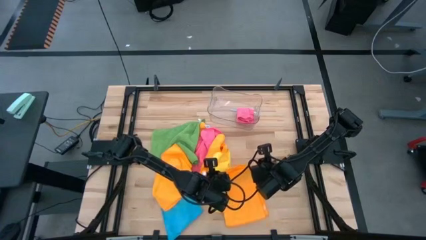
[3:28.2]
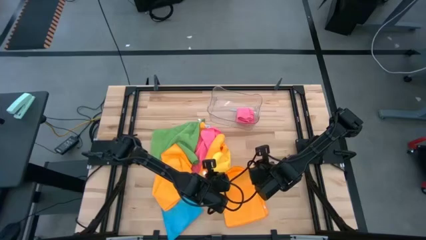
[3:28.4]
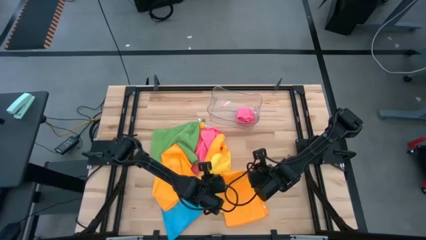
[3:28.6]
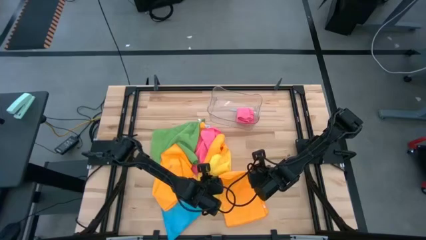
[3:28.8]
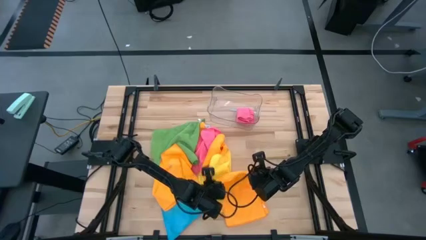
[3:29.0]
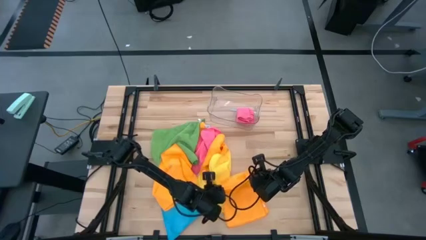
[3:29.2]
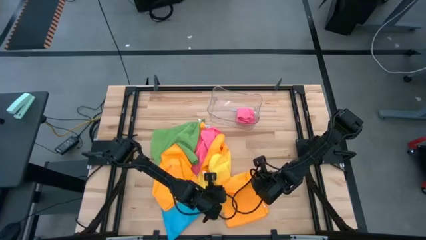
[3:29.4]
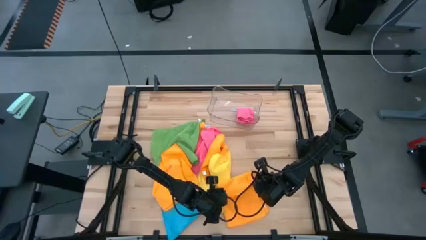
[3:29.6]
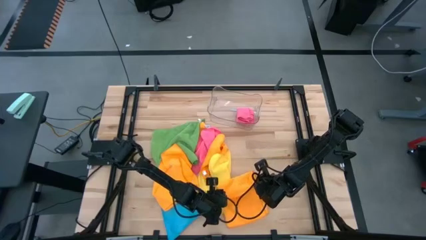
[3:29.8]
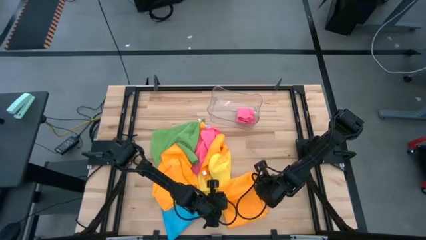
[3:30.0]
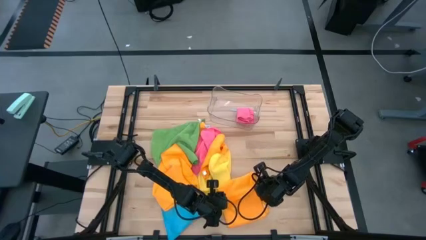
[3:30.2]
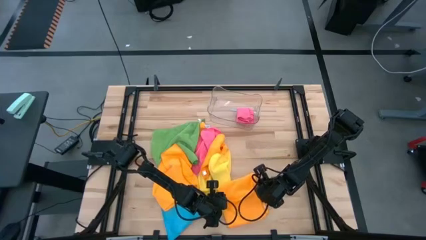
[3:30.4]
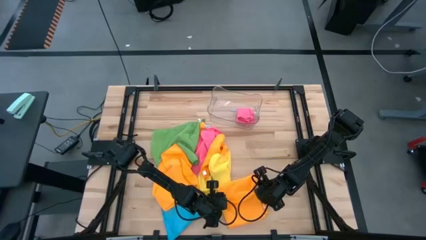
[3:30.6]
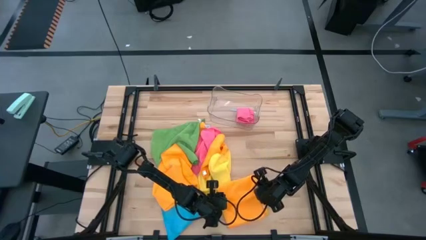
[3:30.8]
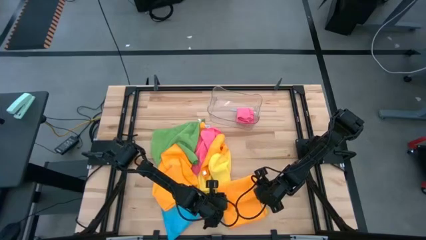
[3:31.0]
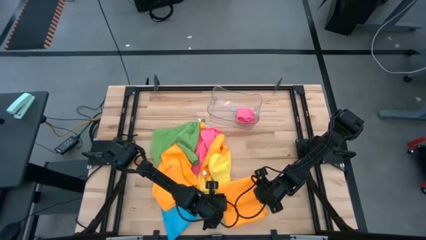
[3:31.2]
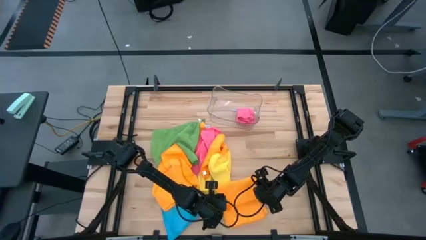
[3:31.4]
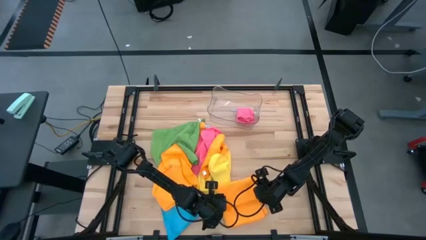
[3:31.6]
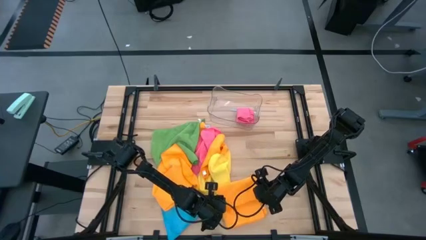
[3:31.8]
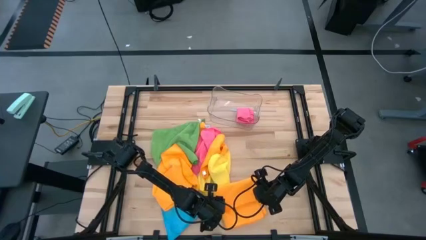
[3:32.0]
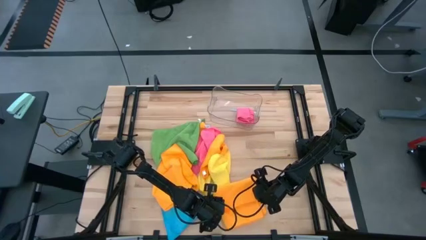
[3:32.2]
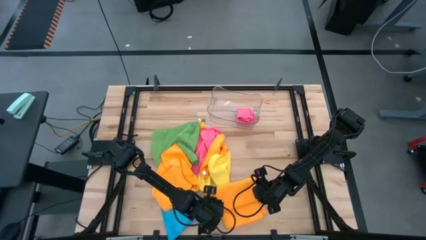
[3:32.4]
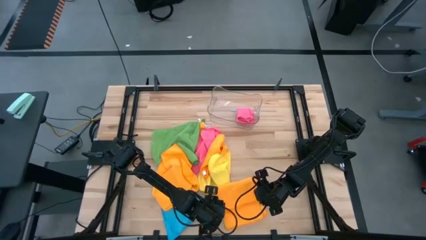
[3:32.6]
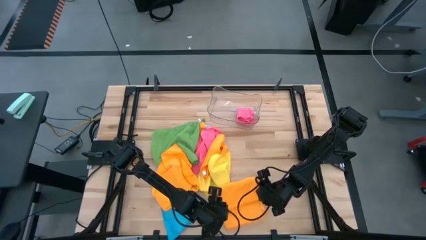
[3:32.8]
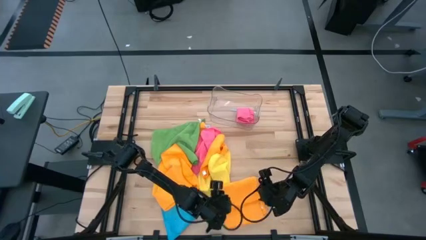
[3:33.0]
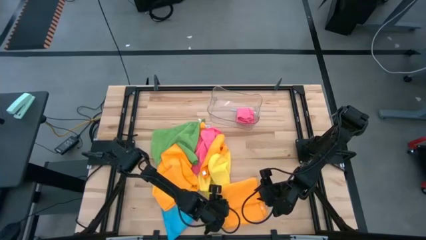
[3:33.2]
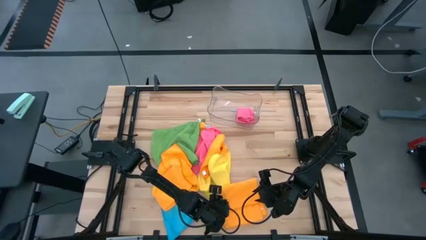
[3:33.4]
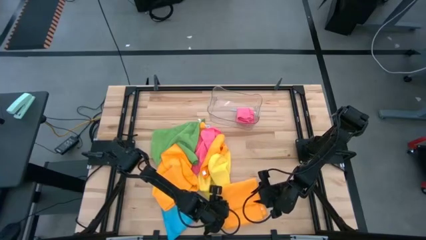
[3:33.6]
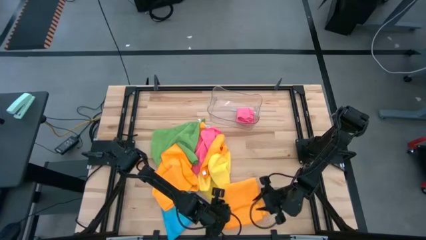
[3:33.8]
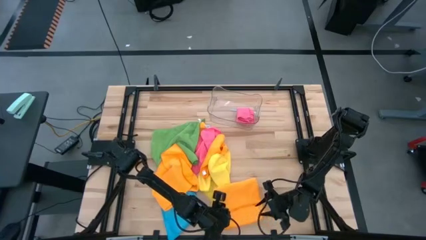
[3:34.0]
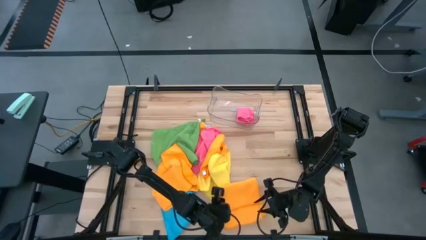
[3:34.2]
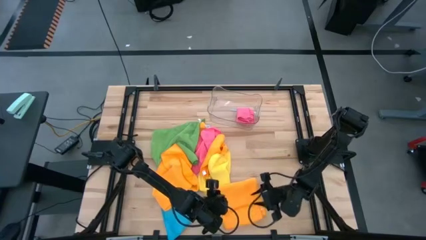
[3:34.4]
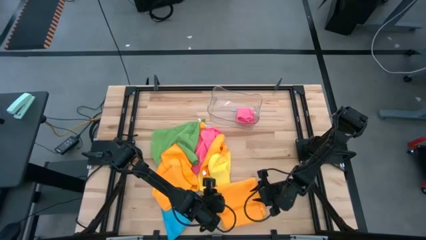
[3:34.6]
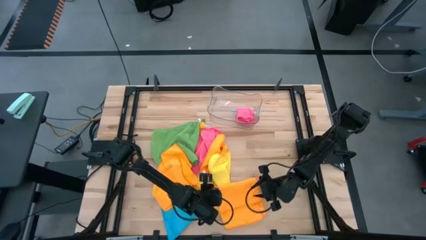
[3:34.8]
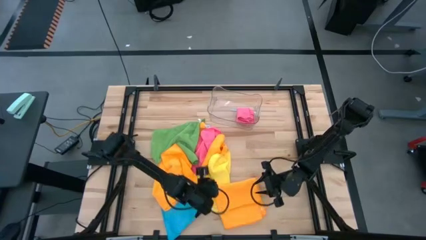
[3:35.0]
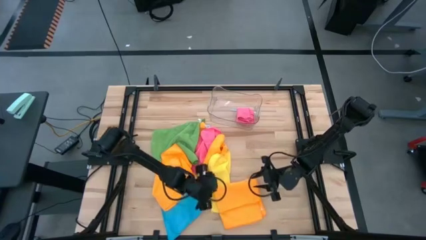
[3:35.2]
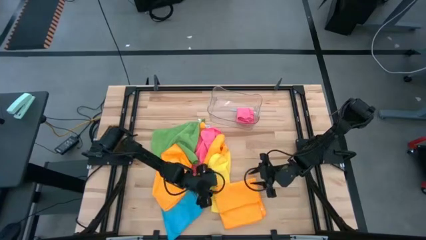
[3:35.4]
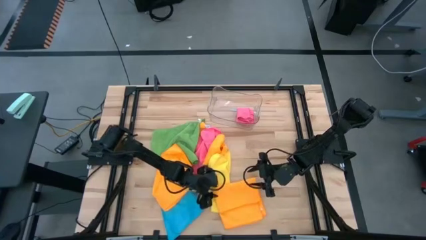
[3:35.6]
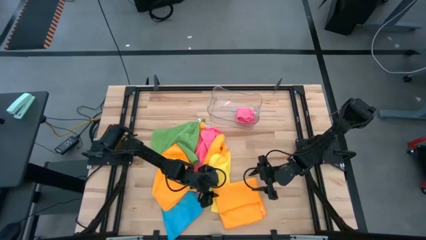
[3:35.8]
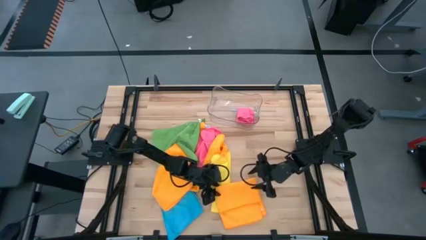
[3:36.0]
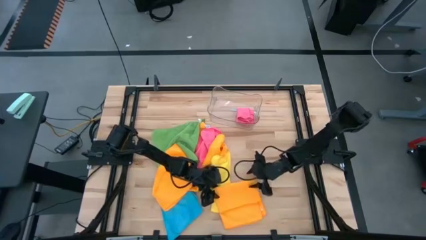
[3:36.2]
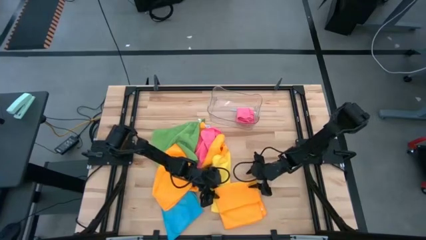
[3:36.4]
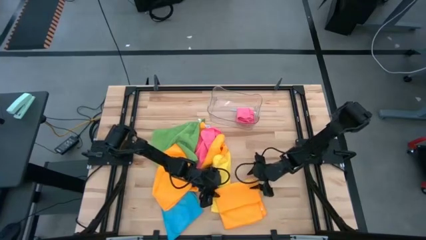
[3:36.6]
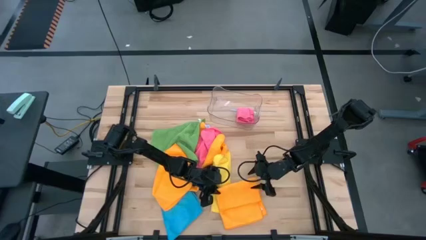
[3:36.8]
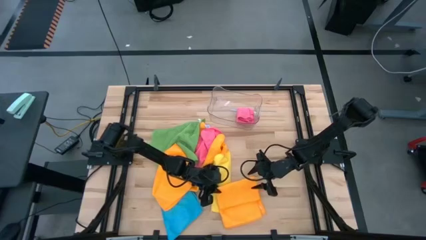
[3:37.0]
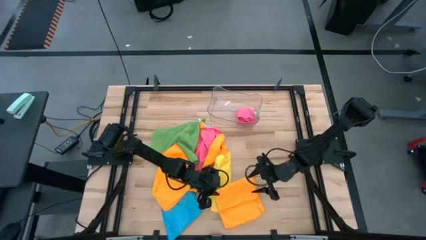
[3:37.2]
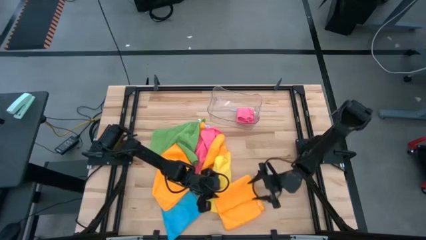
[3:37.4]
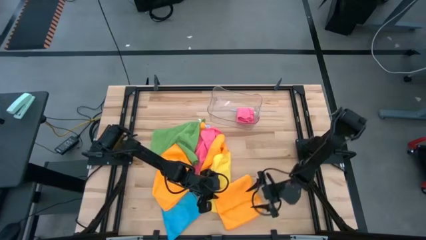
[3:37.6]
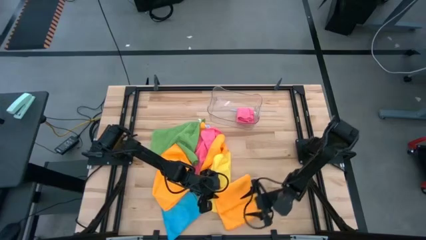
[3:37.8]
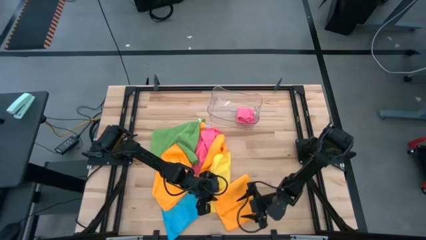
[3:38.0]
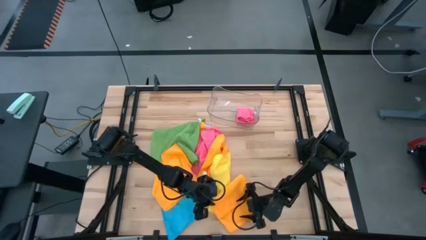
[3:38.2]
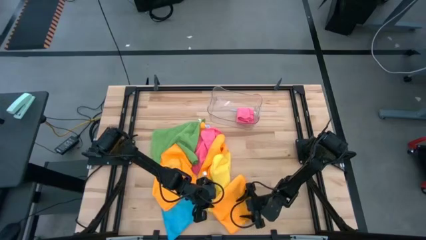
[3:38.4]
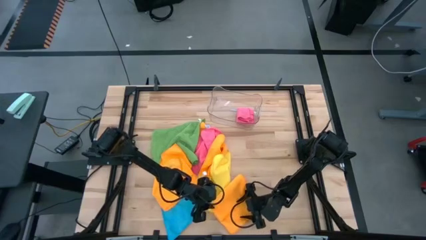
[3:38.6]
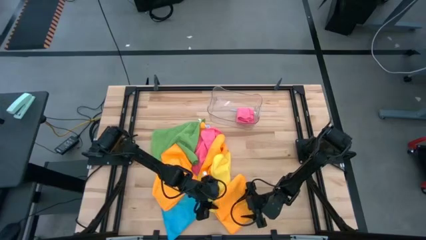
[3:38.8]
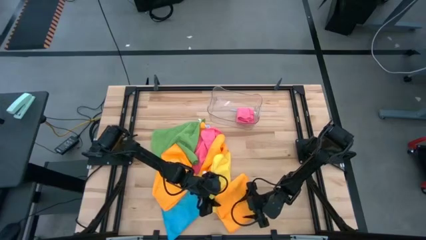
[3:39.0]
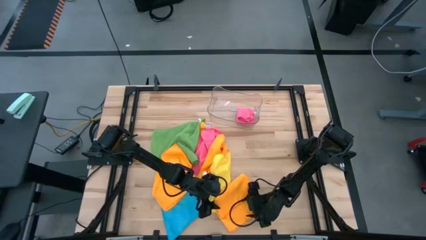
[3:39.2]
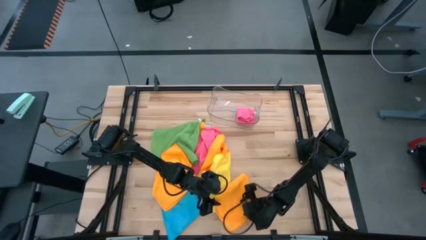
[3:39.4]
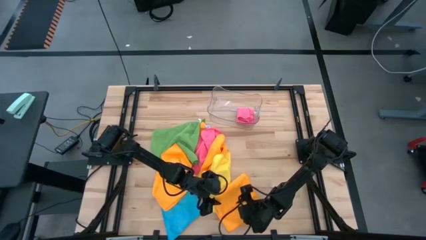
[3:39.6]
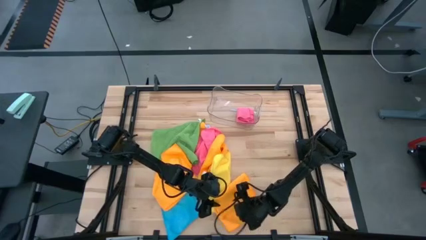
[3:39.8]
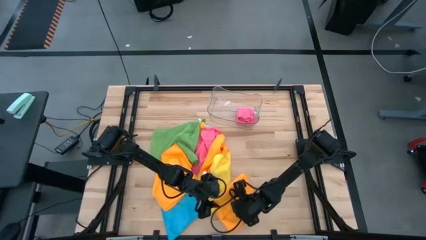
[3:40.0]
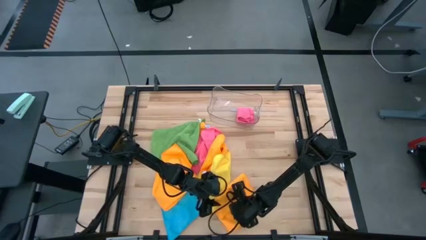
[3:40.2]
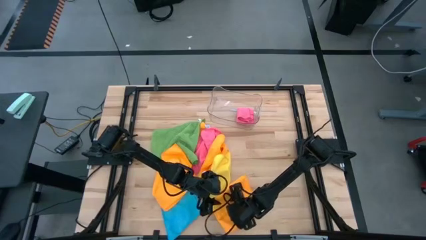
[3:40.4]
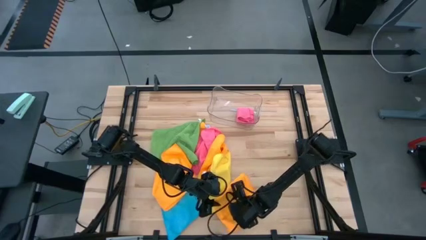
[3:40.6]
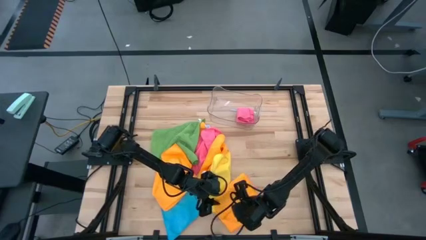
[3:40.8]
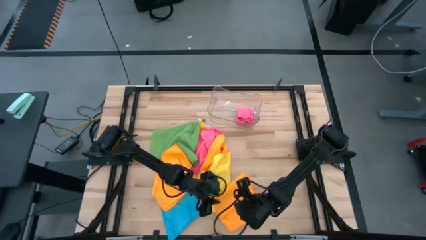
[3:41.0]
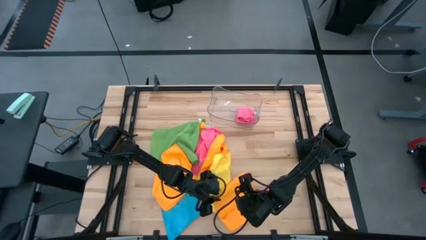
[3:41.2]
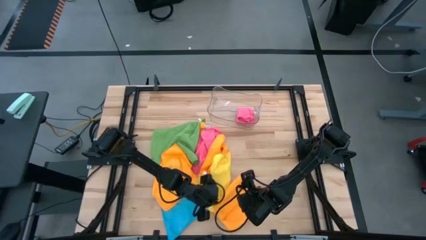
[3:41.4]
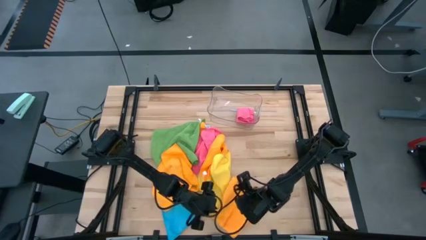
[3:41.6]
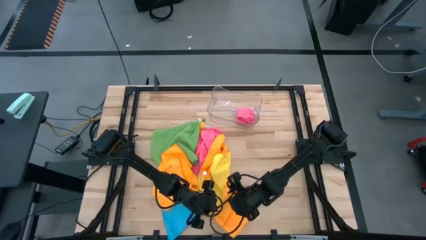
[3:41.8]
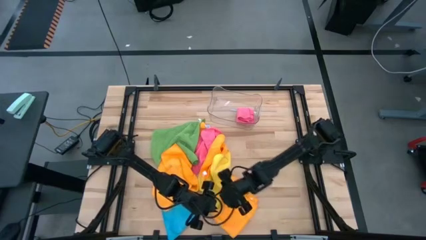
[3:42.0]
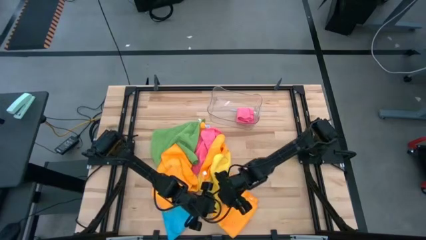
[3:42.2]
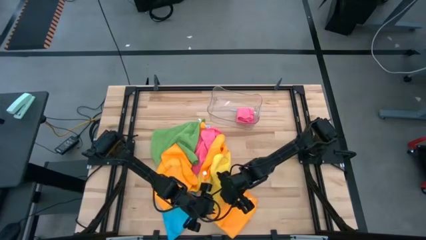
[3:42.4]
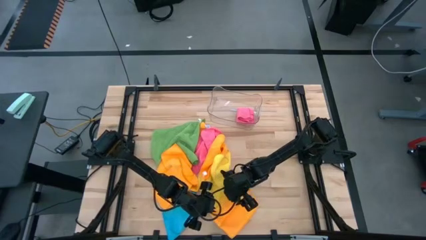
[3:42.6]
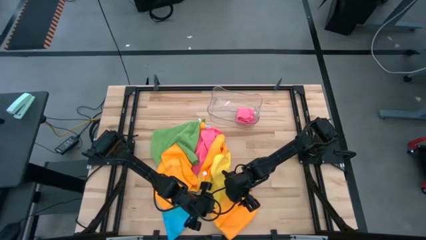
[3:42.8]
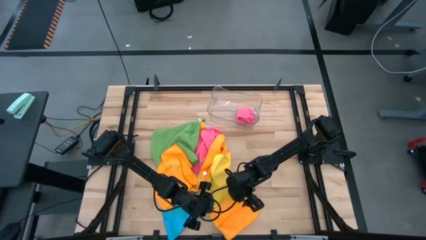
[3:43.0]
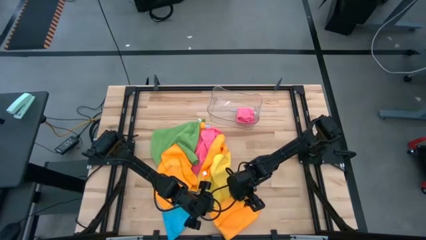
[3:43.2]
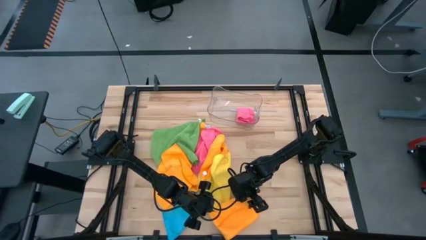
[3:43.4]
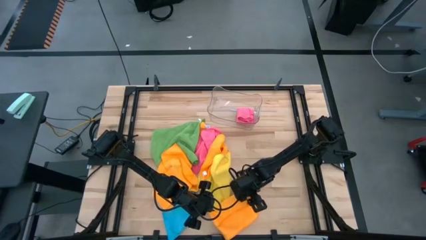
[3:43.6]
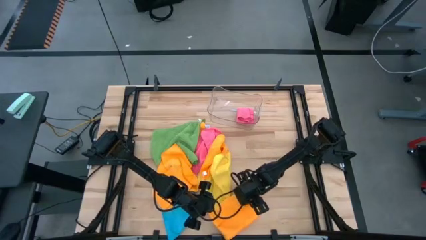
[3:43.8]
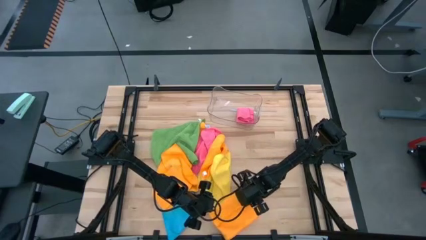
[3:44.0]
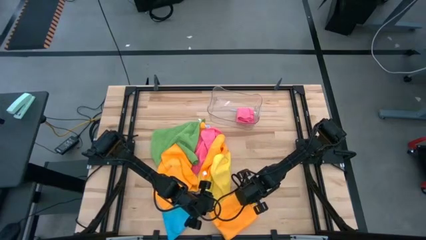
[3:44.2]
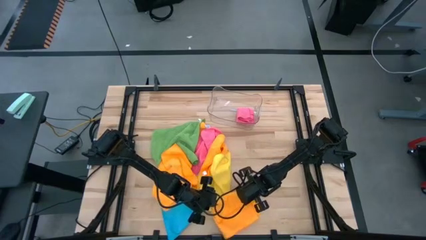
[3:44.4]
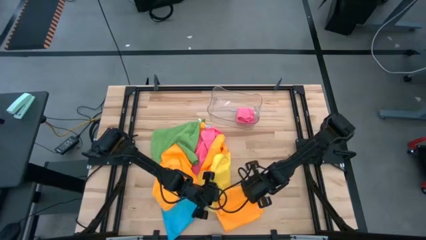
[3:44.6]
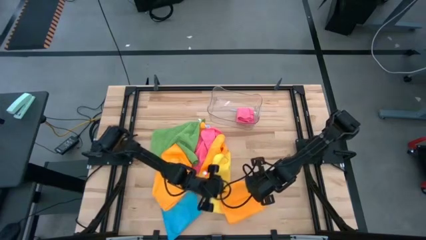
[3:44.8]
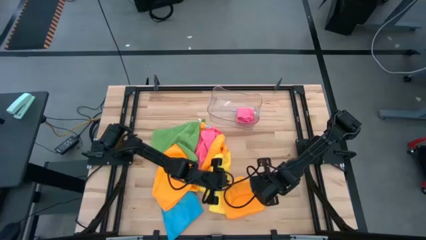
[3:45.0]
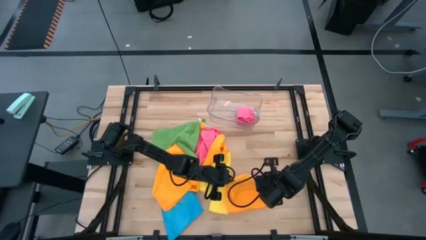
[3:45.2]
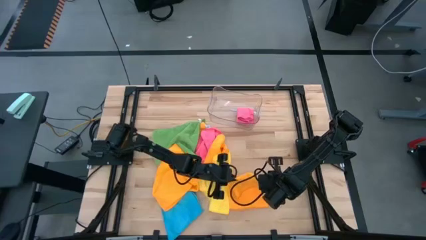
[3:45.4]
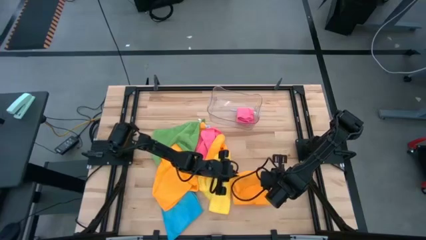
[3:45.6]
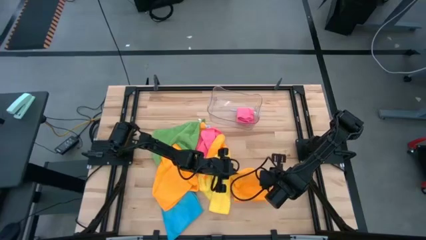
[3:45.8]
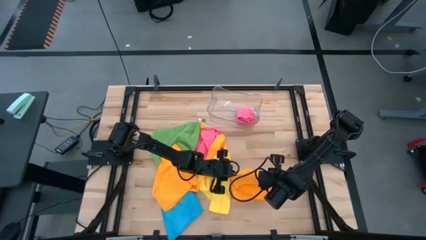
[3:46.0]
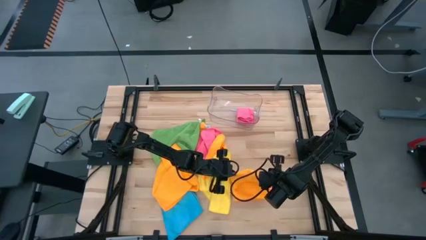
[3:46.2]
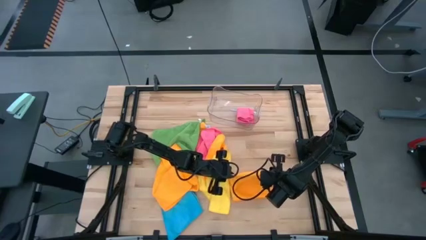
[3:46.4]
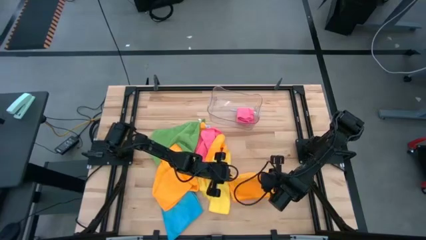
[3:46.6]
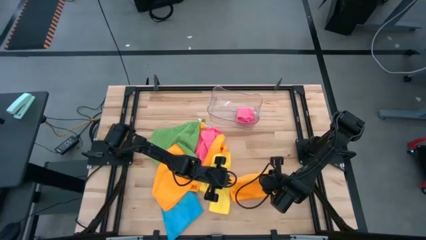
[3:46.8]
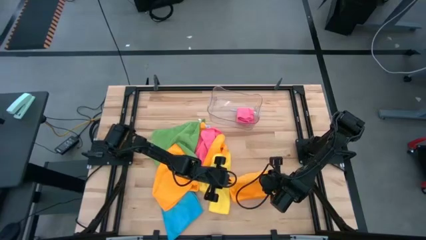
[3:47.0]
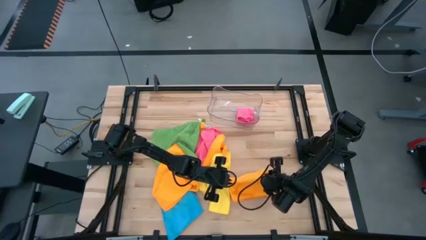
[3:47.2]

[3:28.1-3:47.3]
Task: Fold microfiber towels
Fold the right orange microfiber cloth
